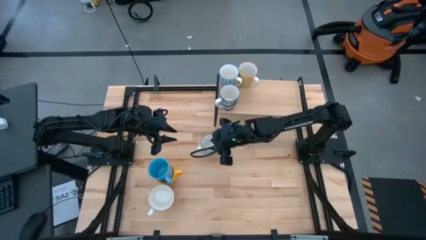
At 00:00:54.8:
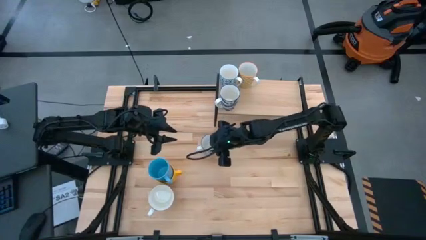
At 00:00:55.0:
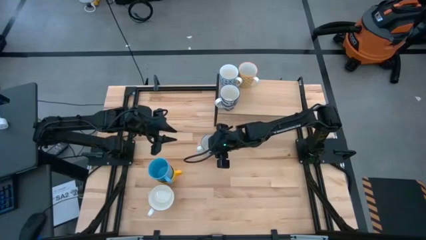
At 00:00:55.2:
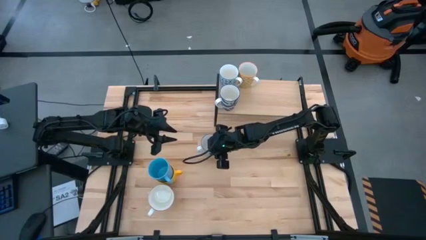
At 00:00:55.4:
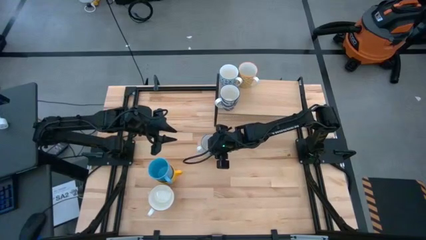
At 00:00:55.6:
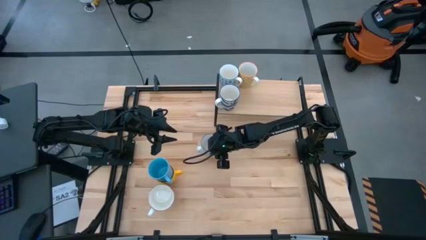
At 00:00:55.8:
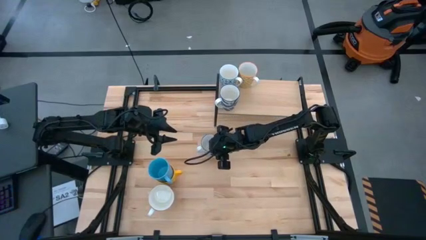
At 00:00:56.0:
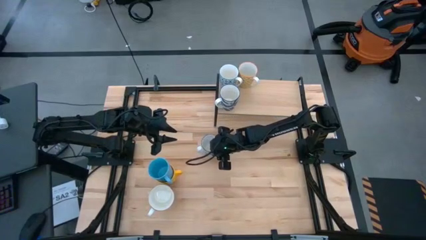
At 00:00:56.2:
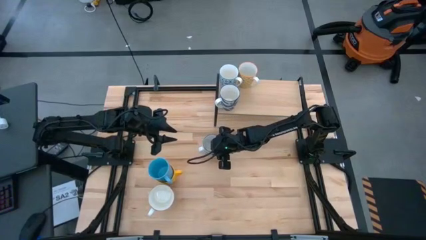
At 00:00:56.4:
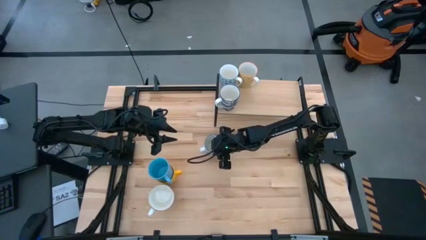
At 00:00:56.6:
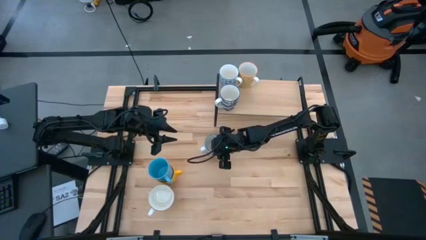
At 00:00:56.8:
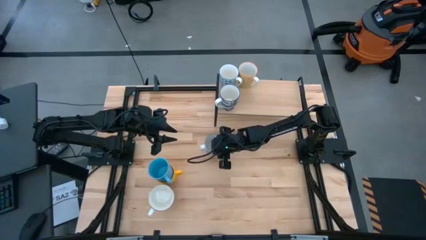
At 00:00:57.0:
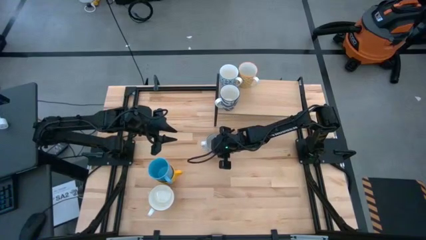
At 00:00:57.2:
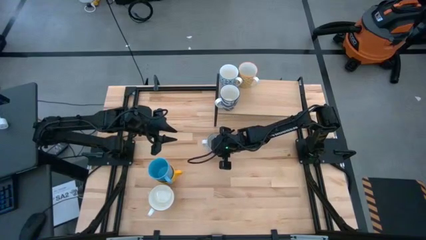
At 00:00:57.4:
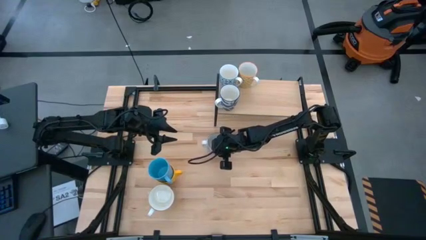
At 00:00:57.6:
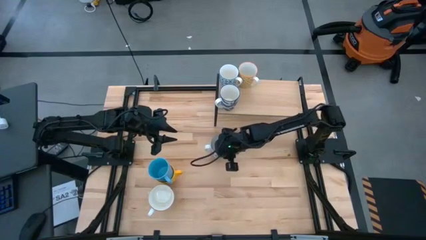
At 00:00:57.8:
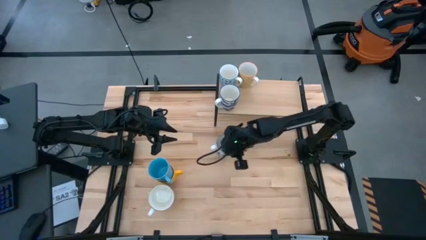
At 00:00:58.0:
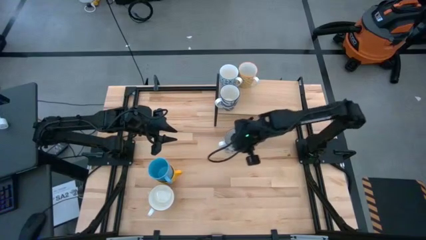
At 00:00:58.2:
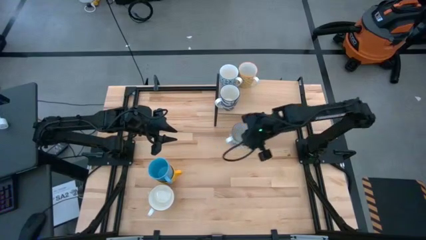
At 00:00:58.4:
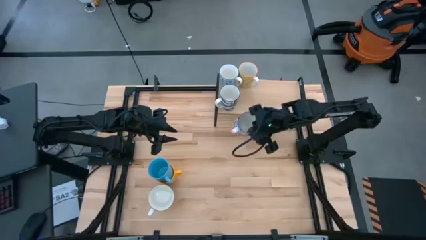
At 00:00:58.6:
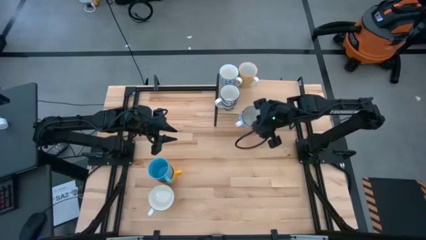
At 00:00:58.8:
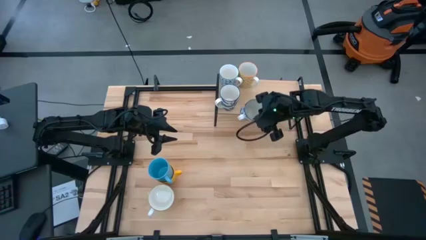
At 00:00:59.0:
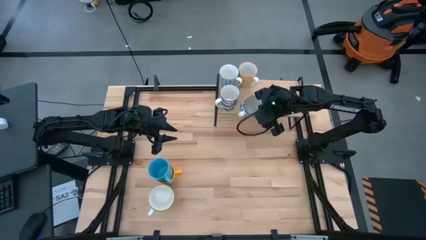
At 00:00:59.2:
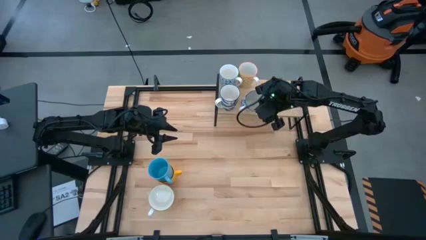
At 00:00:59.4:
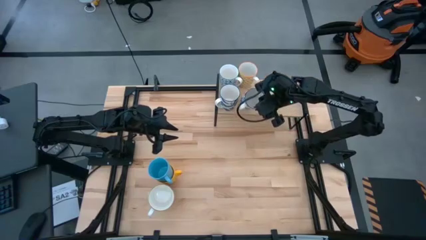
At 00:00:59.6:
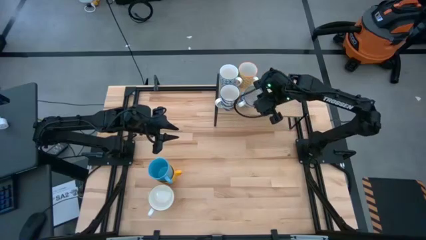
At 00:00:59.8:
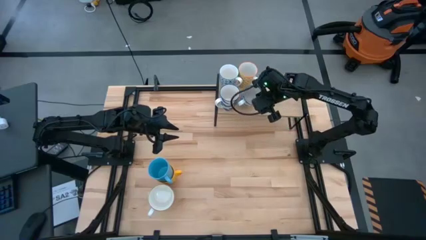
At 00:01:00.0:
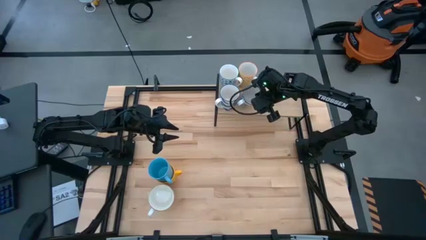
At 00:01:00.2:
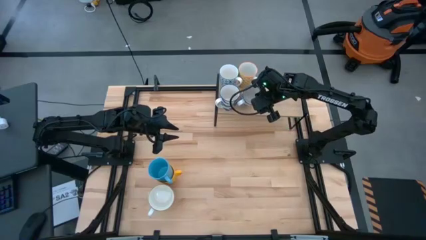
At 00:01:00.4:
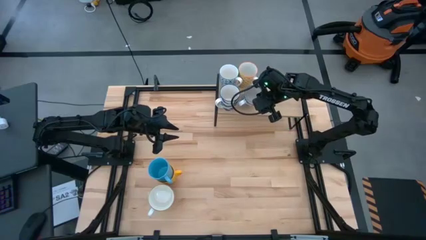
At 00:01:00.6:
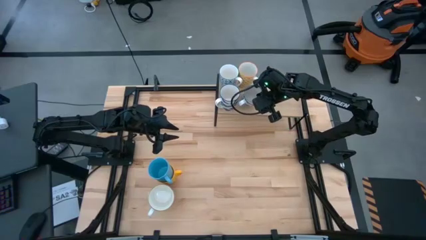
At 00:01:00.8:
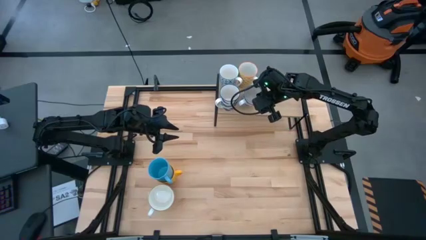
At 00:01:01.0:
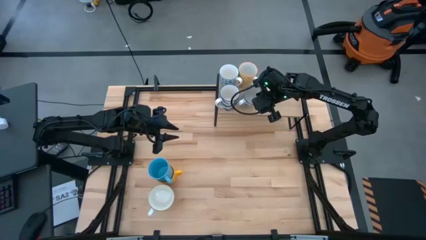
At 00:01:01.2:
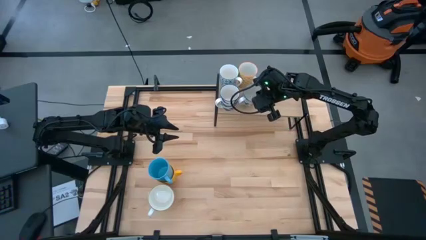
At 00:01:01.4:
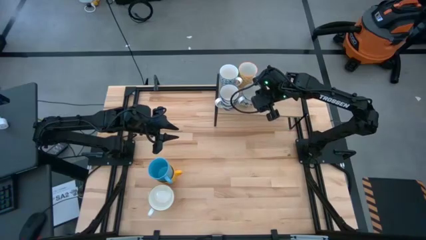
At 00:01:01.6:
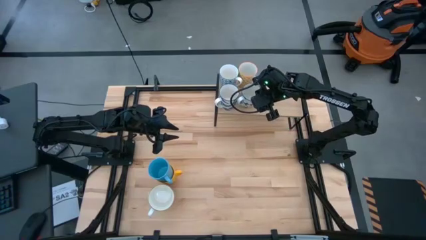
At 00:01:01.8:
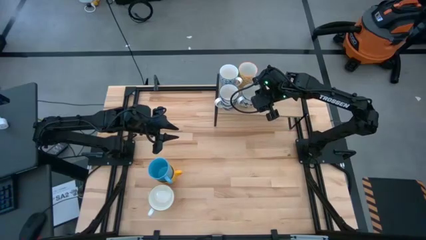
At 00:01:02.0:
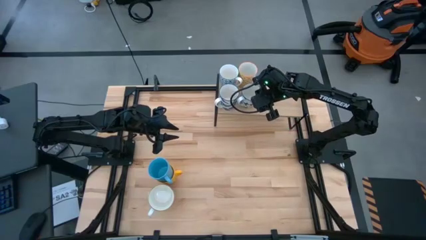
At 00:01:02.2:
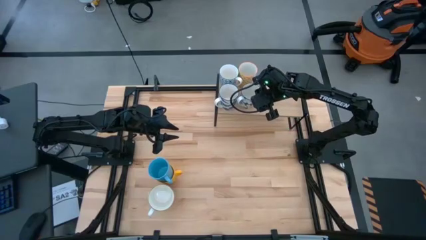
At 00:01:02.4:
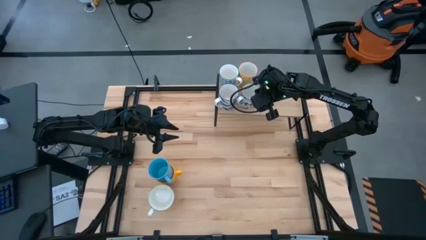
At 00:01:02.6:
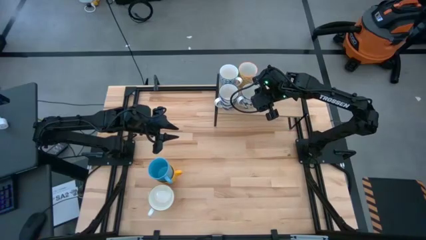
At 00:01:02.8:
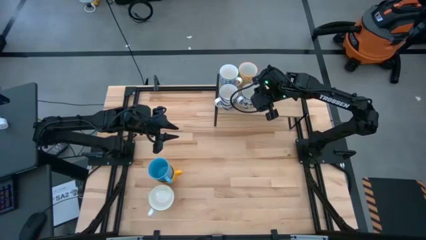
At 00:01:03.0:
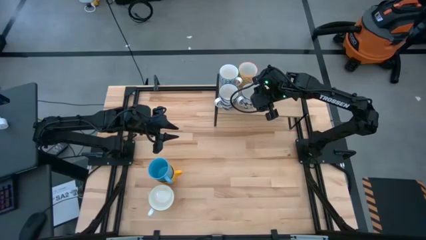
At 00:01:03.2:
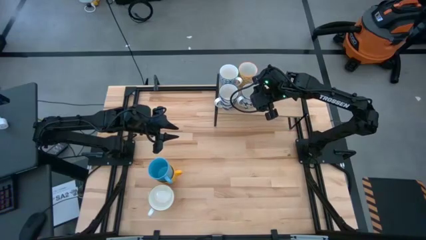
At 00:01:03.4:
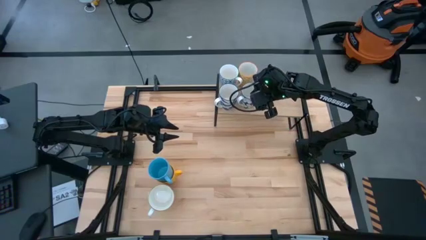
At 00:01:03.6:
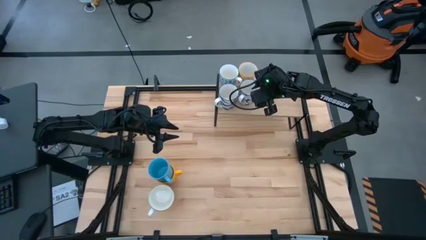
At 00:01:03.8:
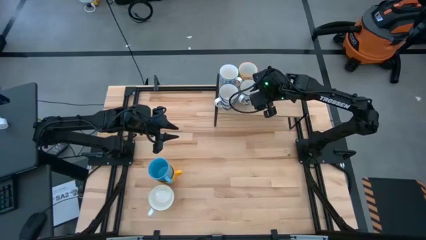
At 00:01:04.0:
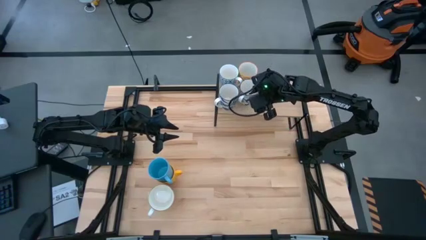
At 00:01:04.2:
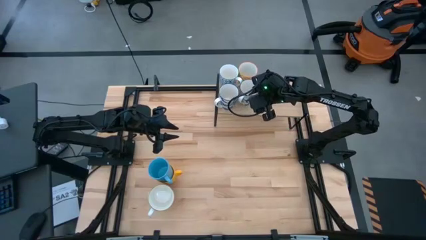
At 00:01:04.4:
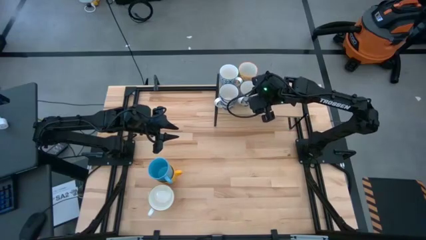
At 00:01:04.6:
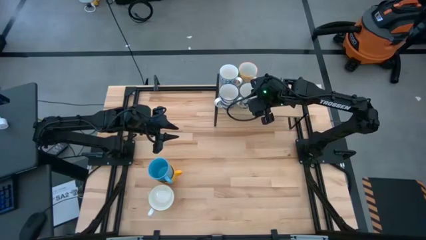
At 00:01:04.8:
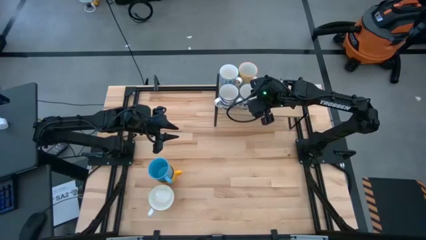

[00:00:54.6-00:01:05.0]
Task: Place coffee mugs
Put the blue pattern mug on the shelf

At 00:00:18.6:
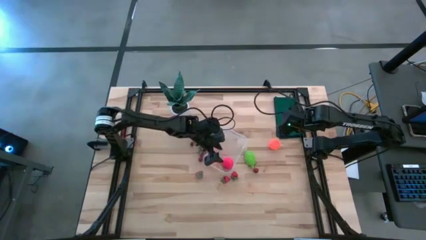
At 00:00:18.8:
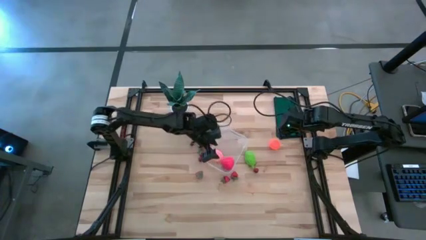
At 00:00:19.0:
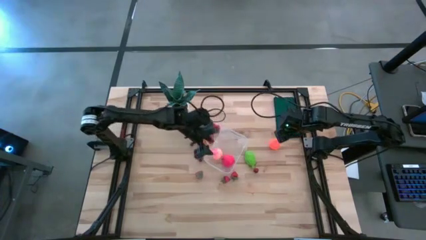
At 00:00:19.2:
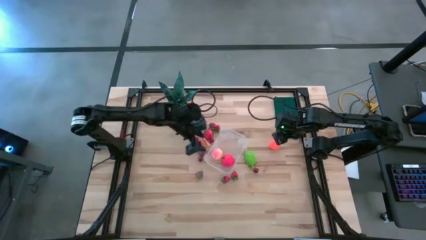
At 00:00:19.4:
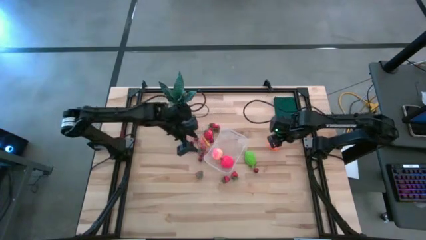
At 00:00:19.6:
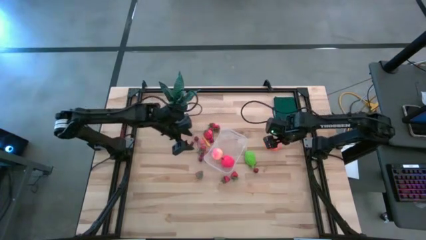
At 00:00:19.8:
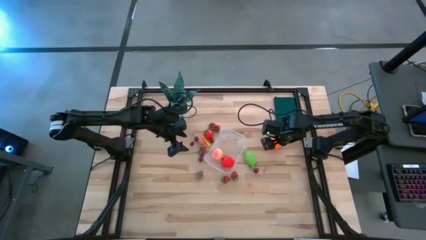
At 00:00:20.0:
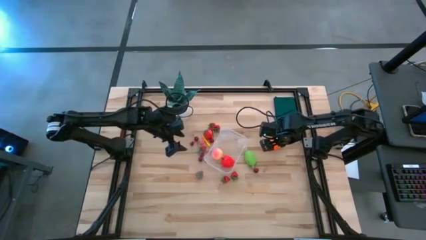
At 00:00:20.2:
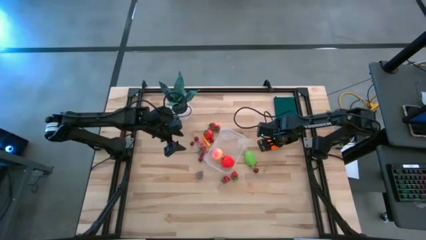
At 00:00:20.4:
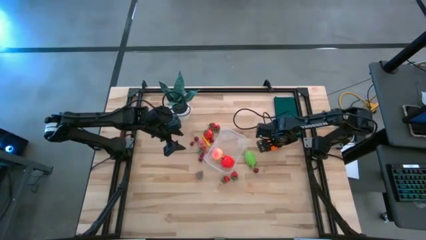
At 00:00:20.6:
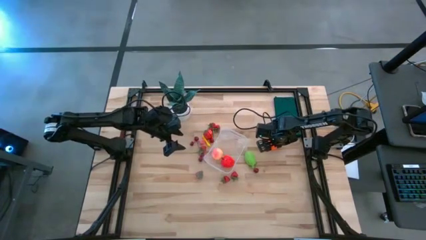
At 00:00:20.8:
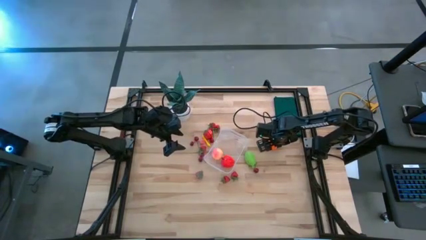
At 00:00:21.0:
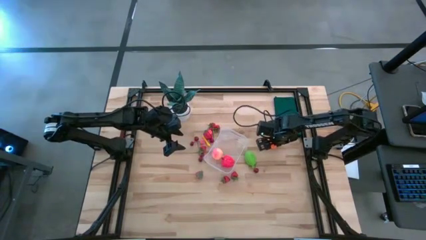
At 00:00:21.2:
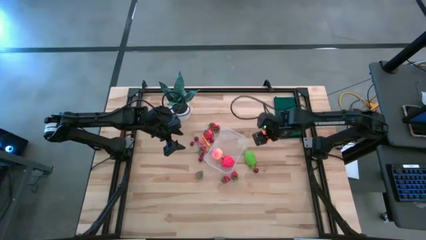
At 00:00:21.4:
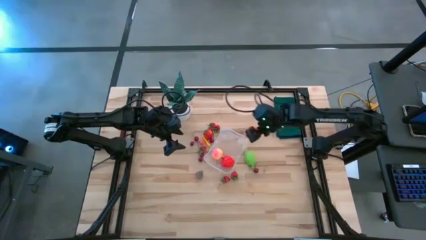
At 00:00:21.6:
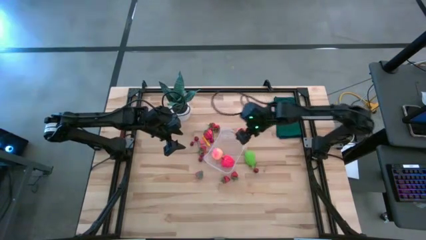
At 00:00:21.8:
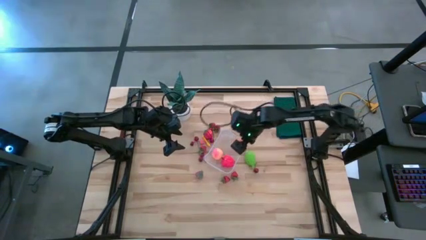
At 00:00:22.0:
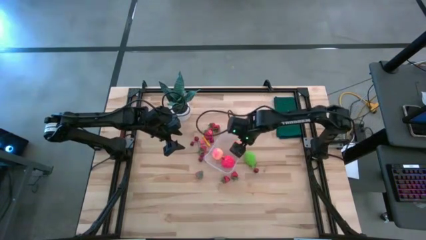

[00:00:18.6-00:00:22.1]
Task: Pick and placing Produce into tupperware
Put the orange pumpkin into the container

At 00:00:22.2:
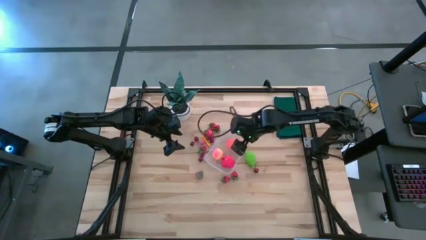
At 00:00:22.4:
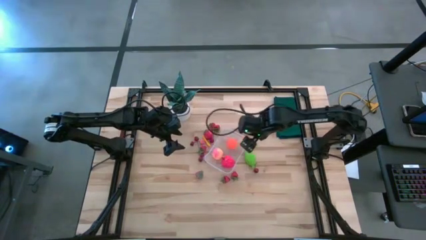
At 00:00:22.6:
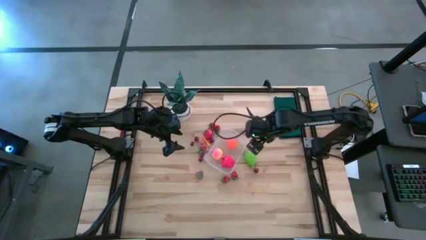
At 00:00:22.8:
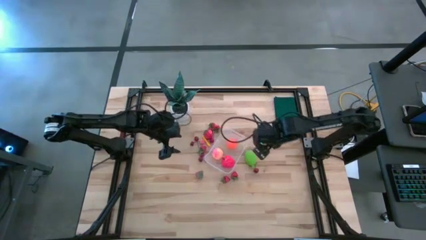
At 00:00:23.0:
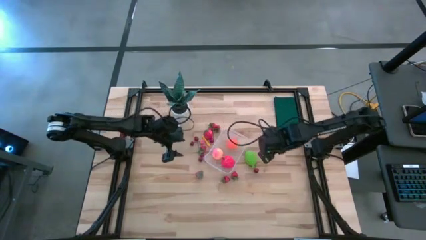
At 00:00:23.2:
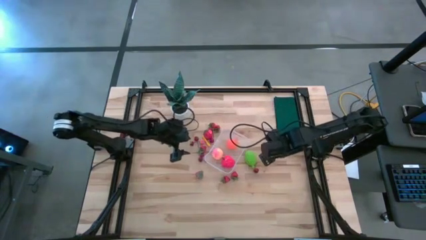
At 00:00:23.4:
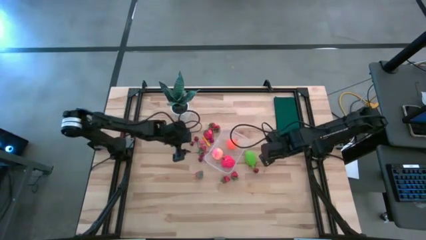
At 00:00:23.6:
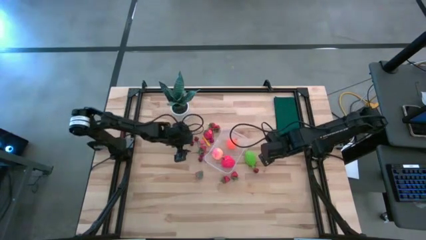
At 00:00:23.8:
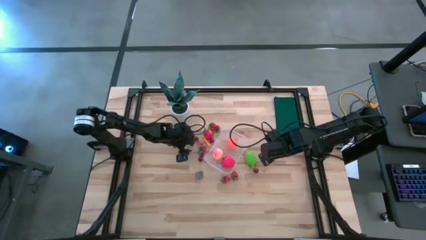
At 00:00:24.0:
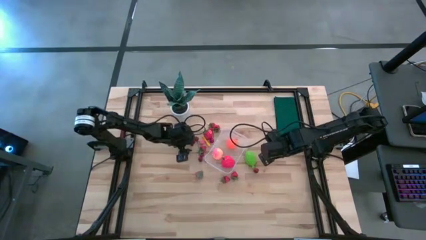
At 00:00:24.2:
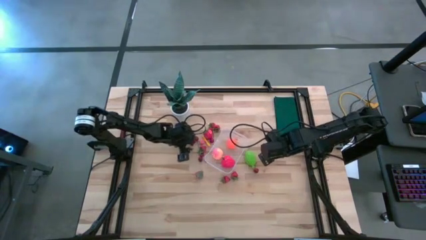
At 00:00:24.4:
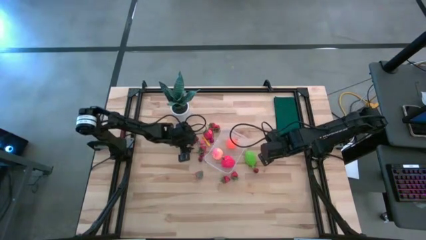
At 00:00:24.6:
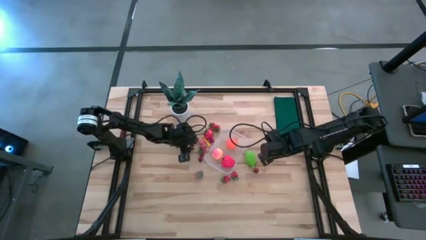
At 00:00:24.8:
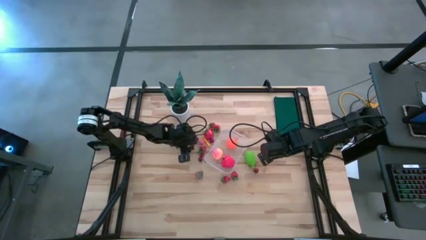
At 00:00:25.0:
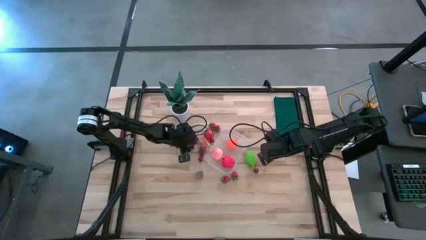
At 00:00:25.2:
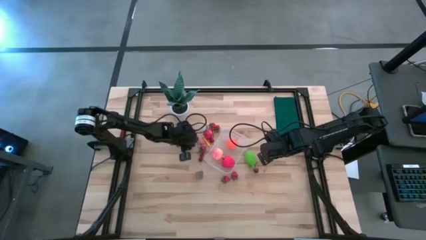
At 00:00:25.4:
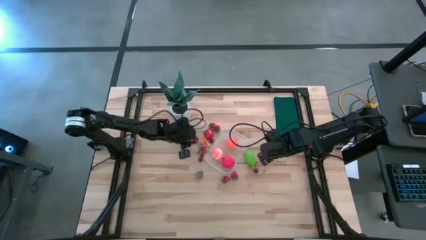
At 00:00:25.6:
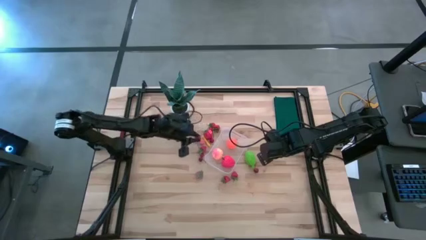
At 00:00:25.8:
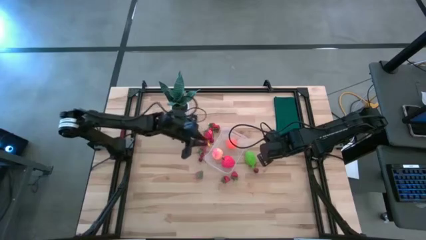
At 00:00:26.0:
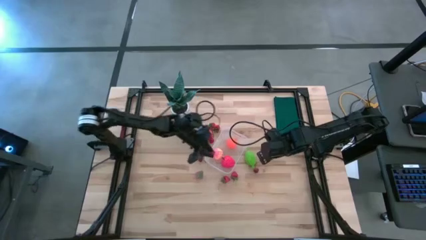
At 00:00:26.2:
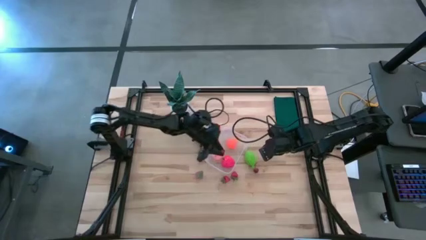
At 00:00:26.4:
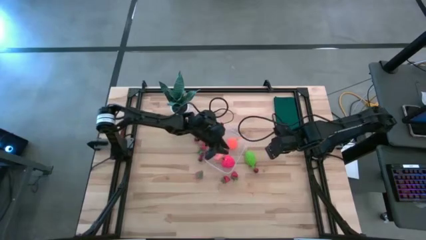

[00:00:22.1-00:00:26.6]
Put the red cherry into the container
